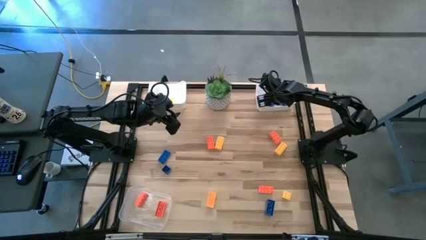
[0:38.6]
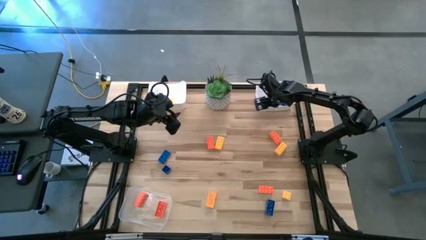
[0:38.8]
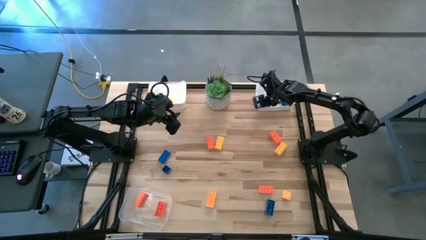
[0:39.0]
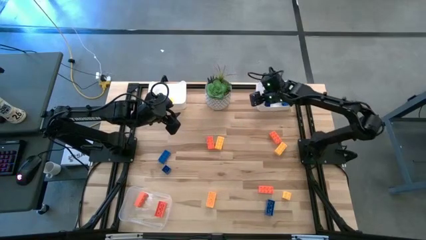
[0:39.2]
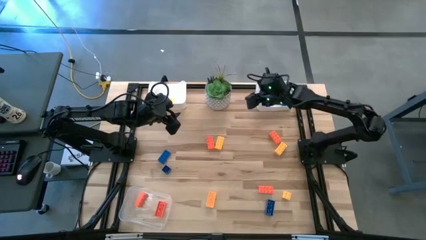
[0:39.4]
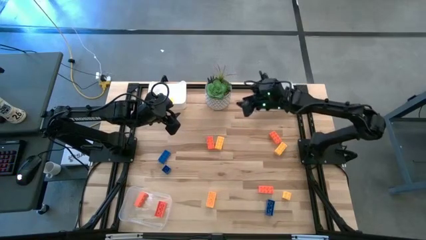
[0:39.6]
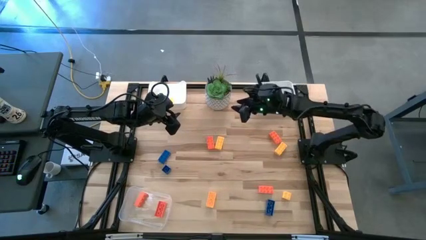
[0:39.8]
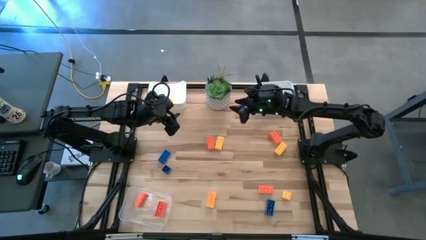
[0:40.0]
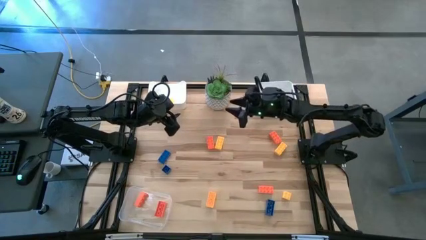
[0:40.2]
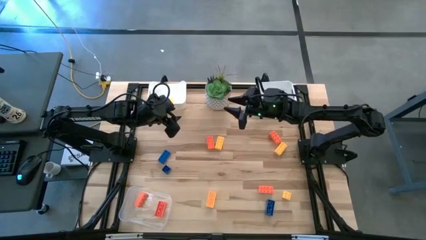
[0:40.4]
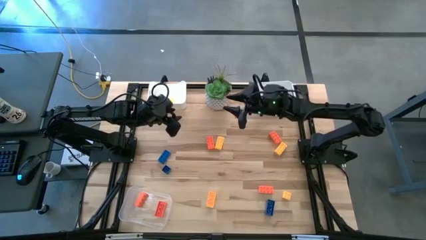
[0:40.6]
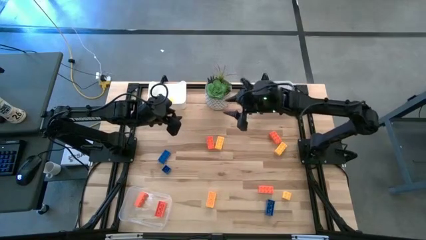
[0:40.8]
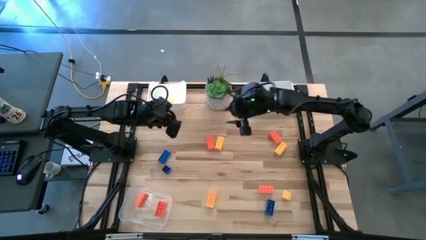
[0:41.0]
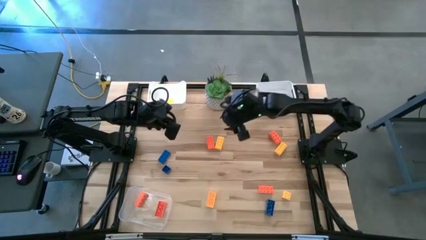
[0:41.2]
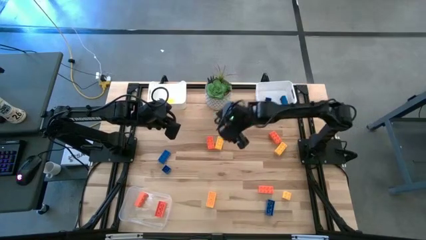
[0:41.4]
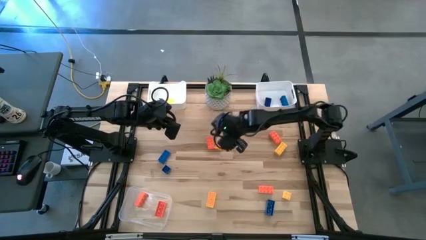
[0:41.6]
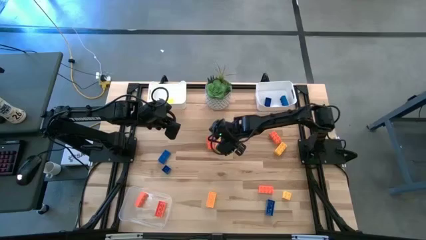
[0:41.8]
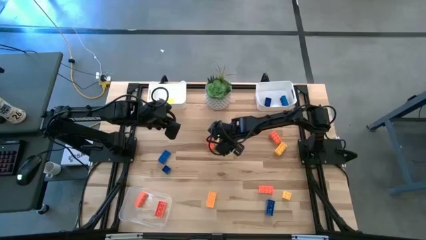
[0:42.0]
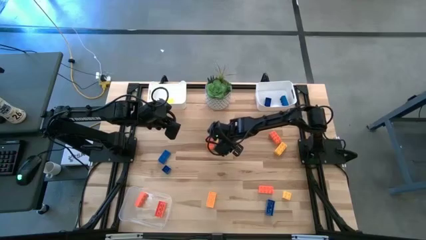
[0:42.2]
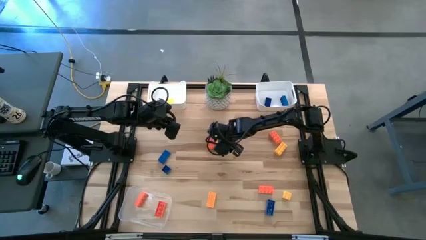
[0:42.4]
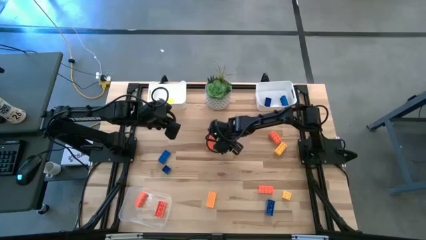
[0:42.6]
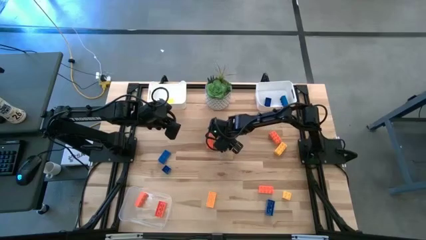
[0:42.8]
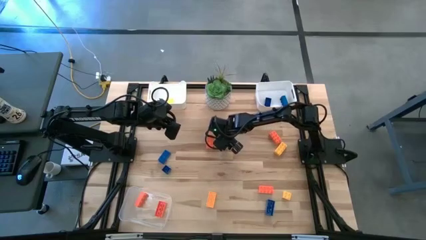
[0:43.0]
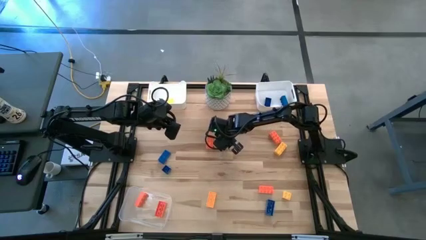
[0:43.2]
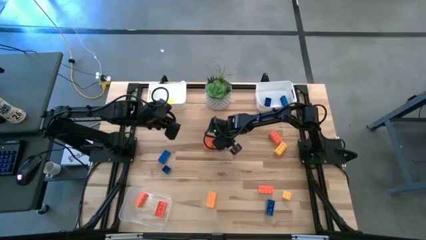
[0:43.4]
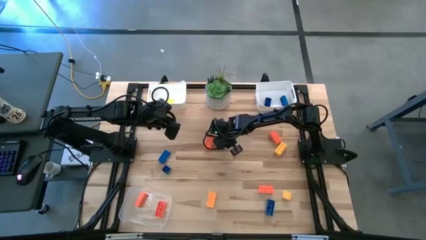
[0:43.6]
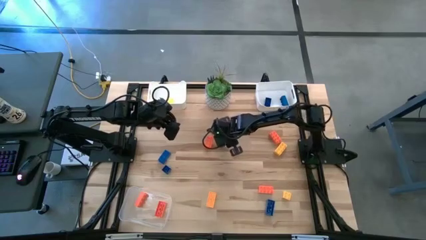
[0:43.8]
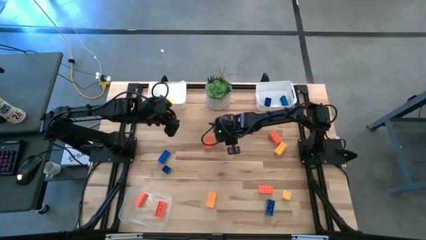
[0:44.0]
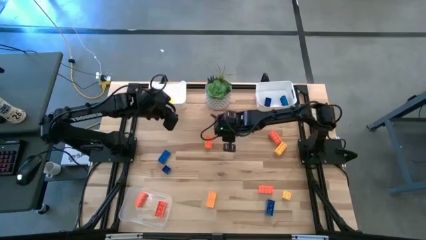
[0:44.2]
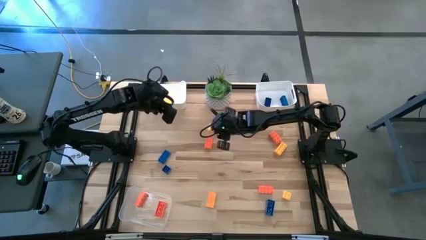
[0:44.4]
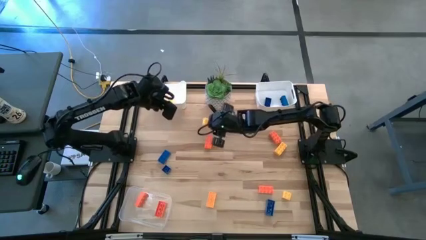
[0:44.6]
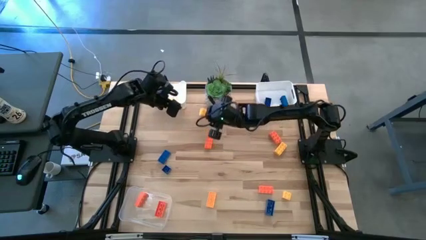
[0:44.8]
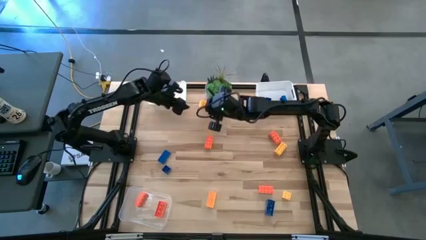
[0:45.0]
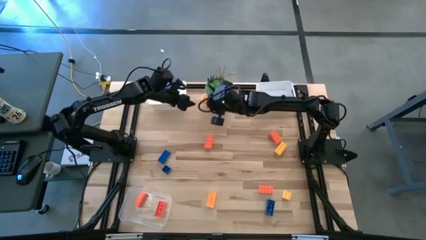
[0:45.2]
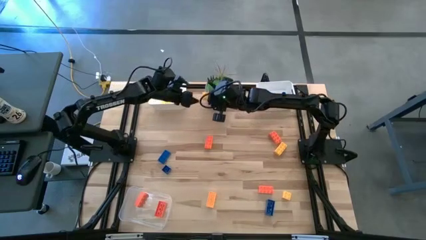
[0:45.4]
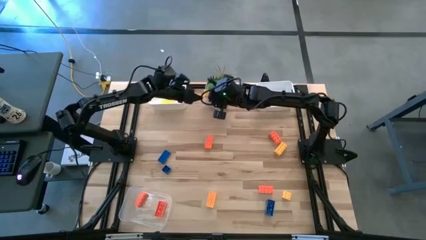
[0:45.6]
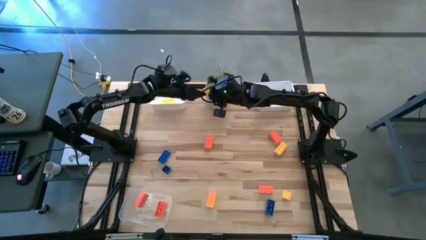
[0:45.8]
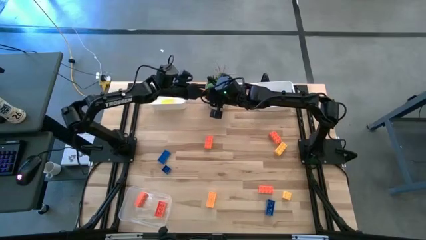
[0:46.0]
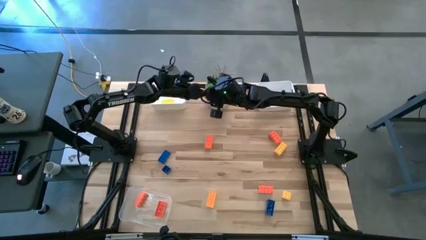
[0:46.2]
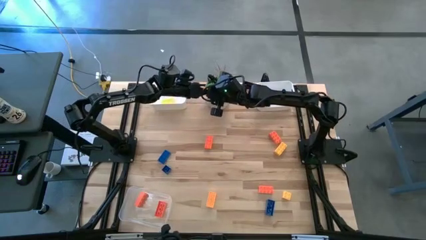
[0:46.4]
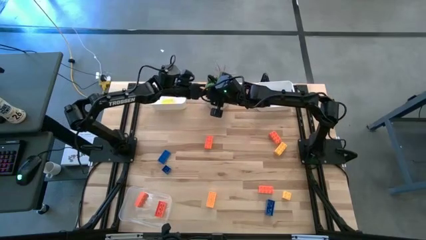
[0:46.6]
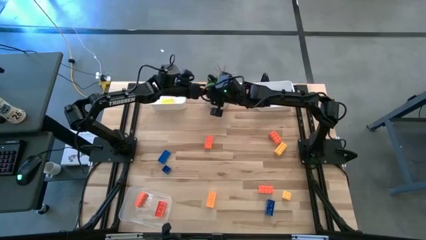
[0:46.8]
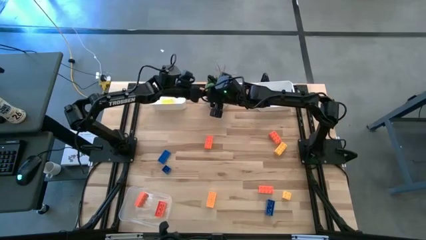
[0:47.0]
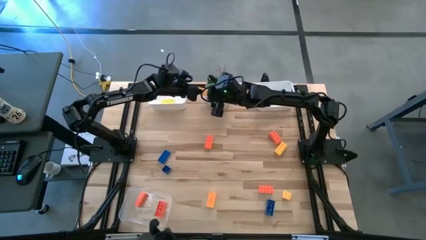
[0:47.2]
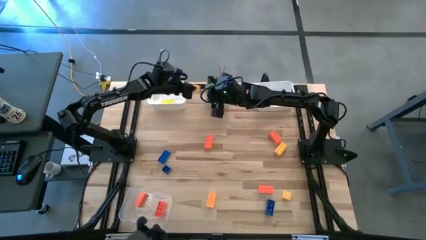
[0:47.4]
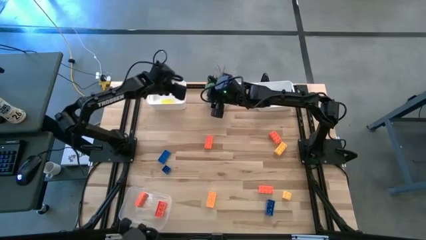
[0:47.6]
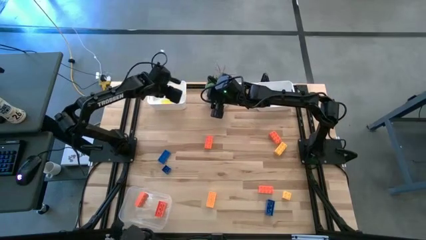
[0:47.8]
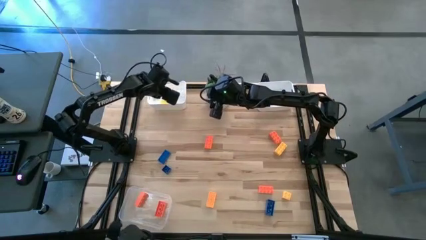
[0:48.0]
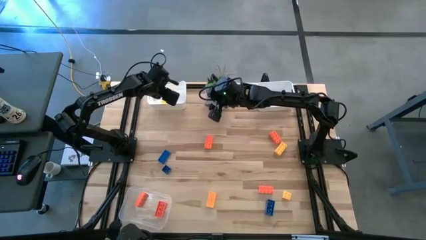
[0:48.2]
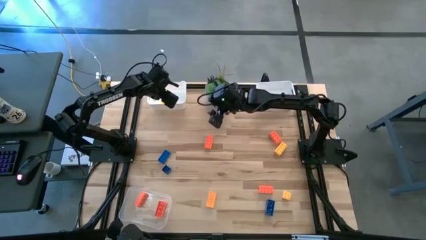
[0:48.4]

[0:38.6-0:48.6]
Task: Sort & place blocks by color
Put the yellow game piece into the left white bin

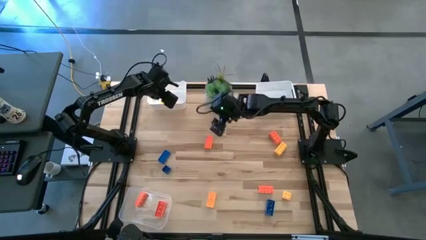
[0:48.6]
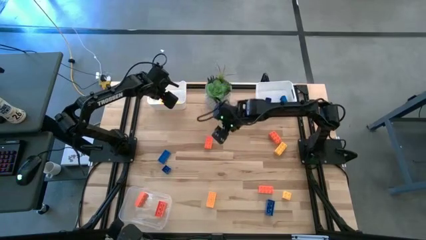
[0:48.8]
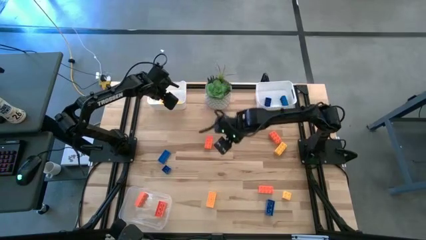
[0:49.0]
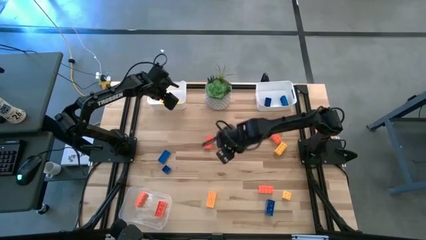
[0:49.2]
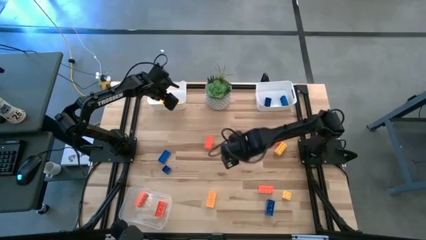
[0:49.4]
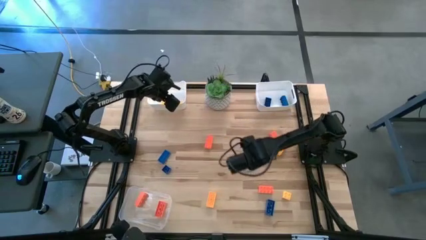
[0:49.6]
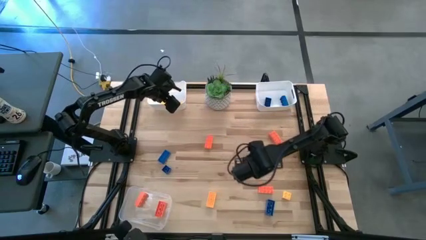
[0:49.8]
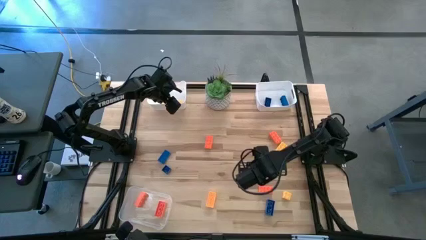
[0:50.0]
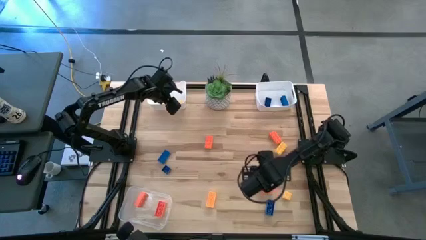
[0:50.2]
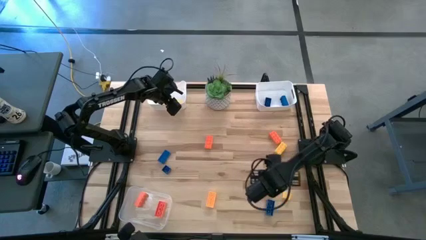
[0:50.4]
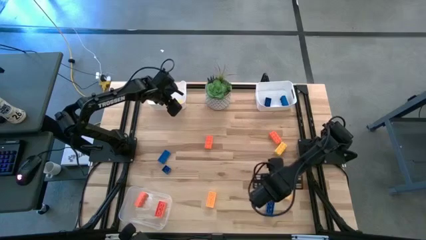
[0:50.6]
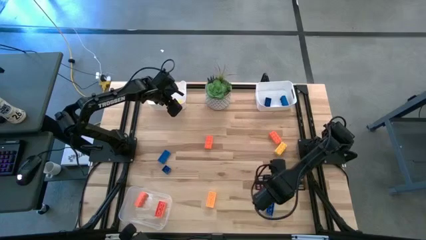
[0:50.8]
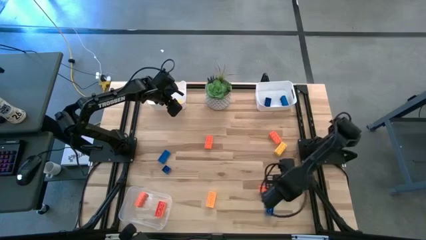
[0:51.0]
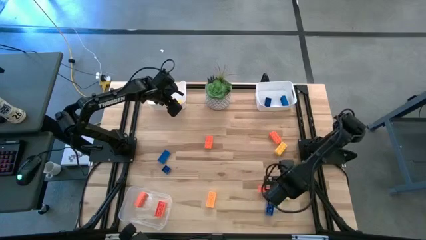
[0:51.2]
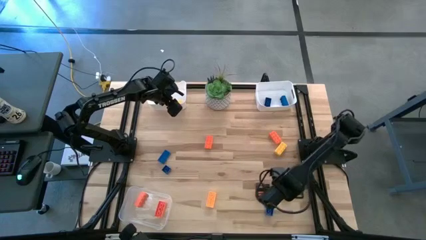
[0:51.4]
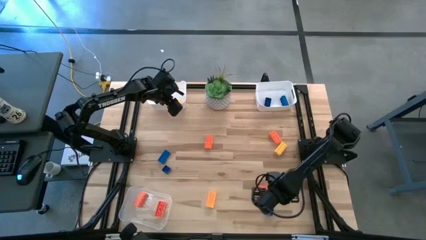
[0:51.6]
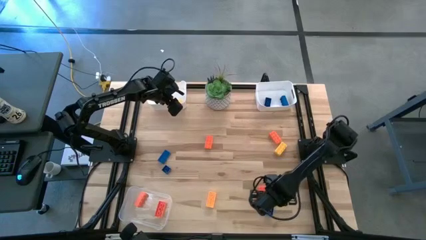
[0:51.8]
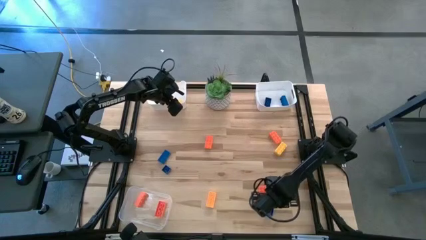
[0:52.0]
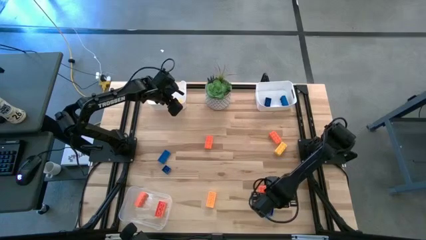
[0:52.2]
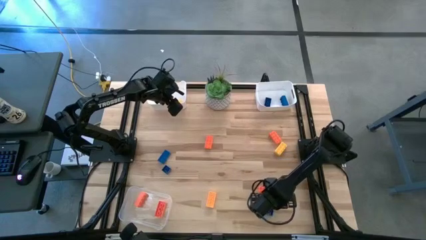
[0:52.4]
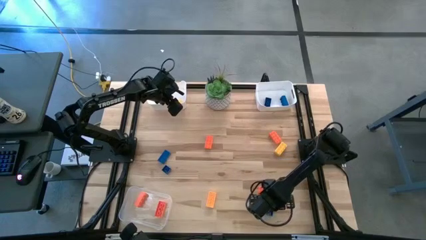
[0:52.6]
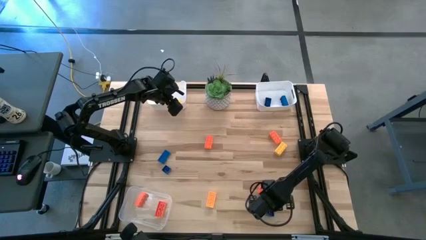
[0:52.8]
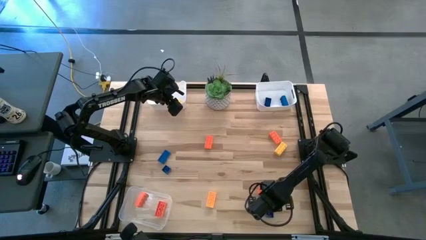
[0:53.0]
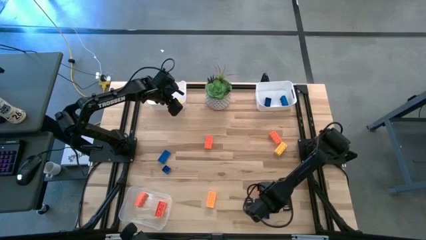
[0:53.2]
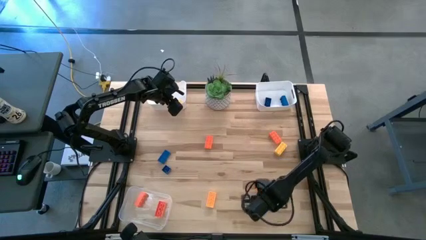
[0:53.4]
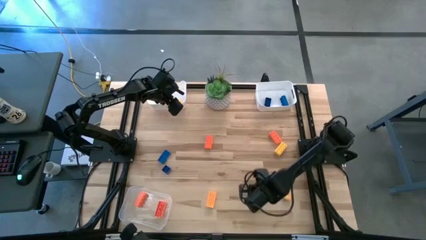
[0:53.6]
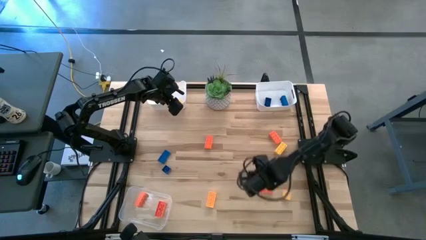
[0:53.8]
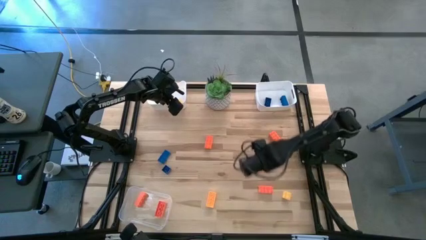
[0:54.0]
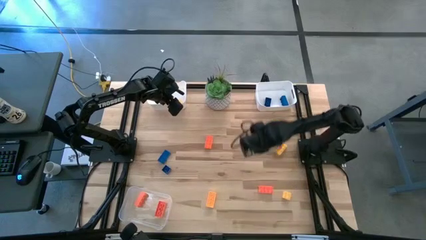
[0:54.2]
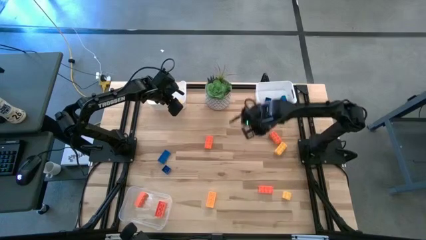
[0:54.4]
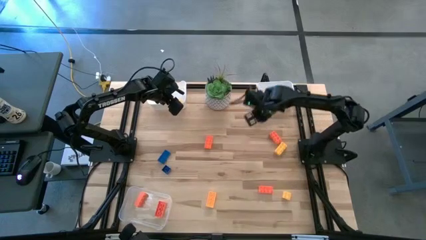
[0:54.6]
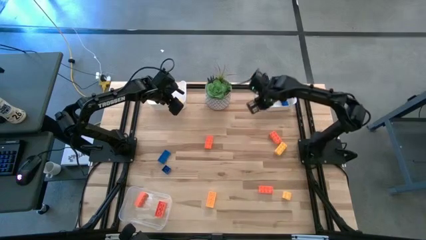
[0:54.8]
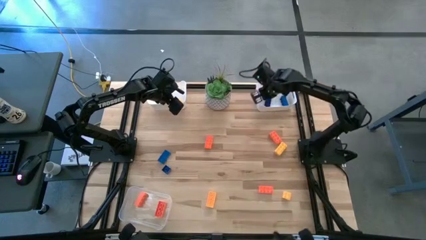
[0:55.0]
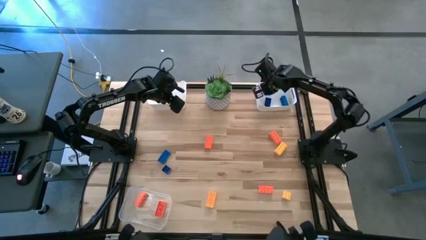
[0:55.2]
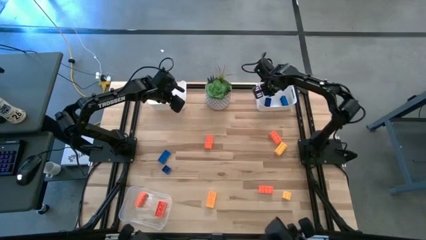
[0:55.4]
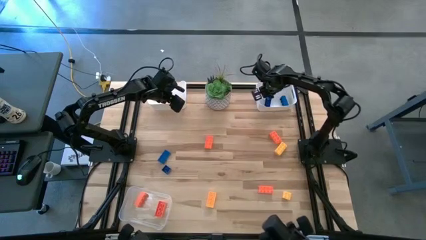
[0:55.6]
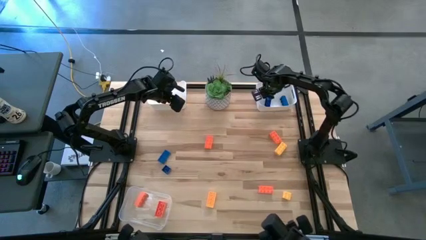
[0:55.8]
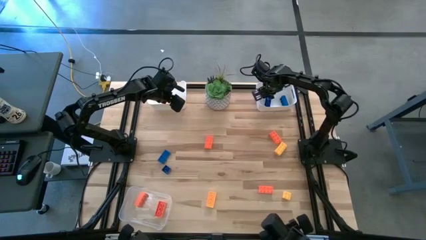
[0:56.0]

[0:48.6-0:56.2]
Put the blue game piece into the right white bin
